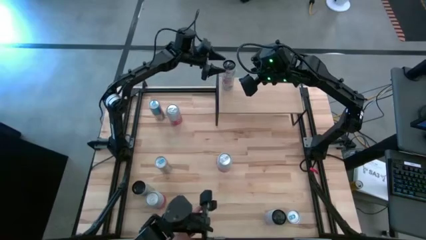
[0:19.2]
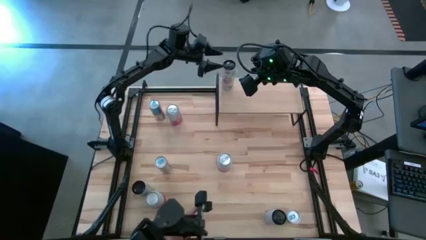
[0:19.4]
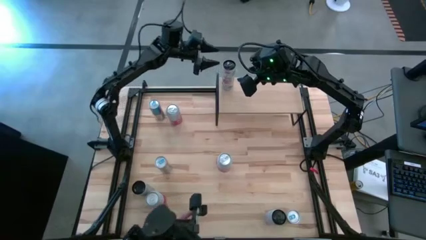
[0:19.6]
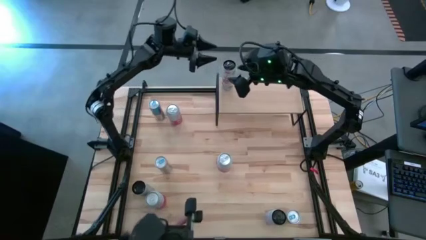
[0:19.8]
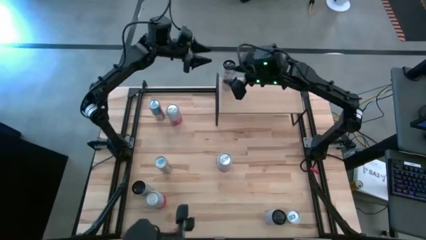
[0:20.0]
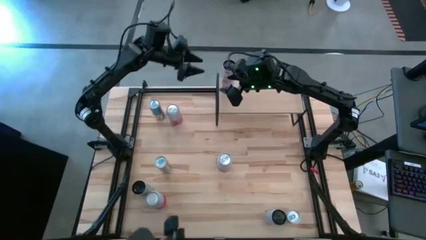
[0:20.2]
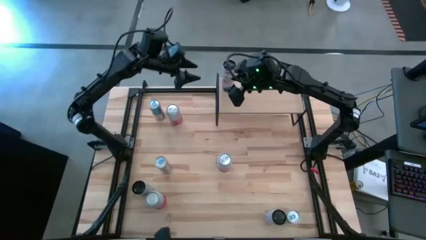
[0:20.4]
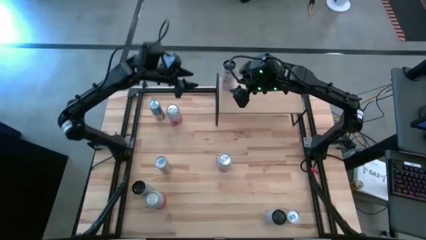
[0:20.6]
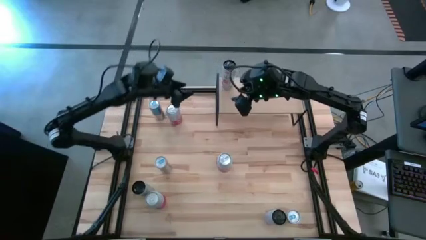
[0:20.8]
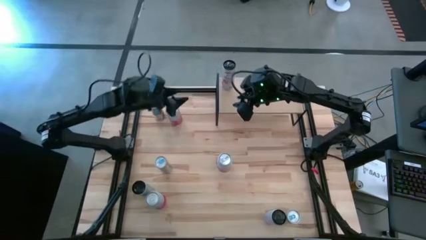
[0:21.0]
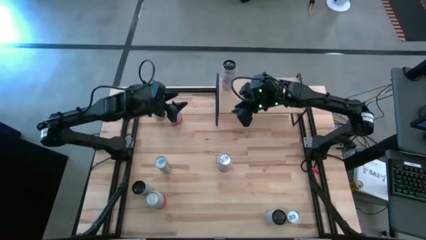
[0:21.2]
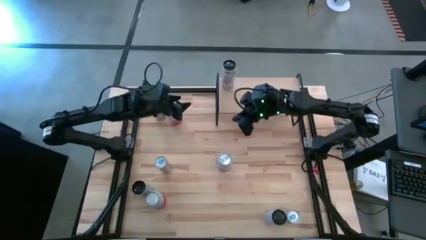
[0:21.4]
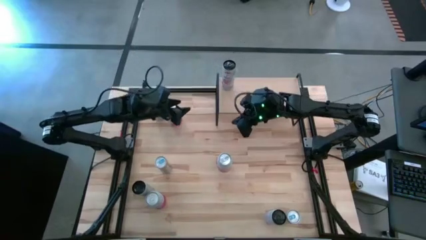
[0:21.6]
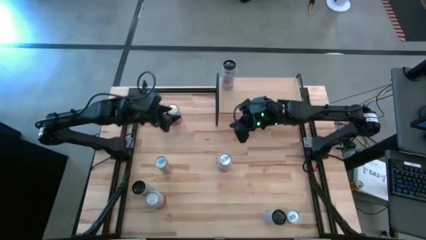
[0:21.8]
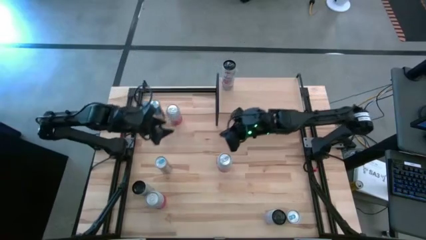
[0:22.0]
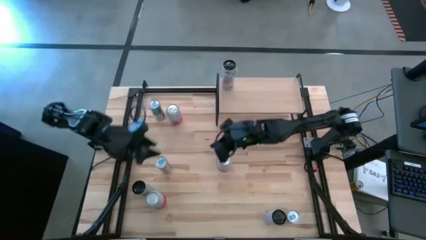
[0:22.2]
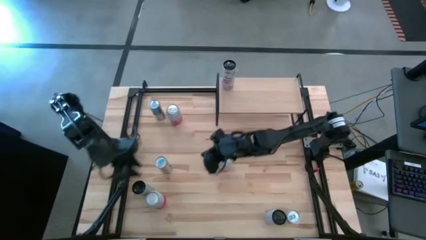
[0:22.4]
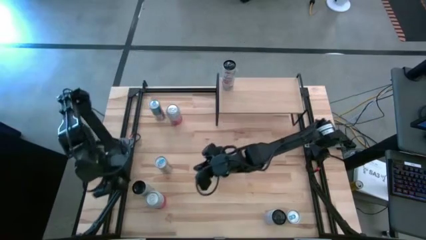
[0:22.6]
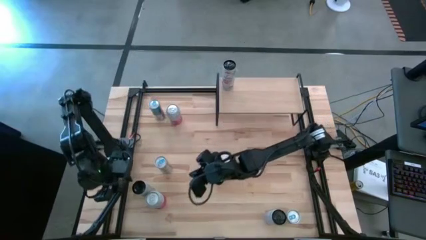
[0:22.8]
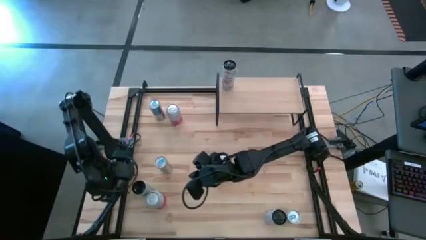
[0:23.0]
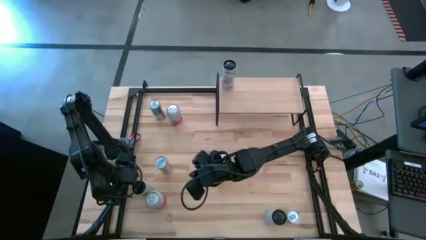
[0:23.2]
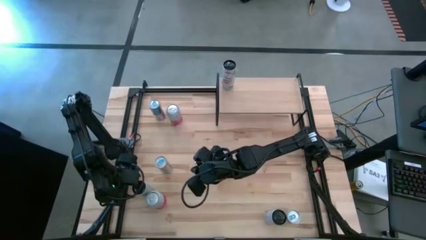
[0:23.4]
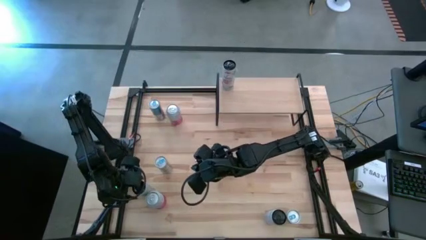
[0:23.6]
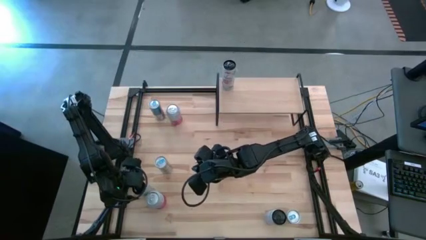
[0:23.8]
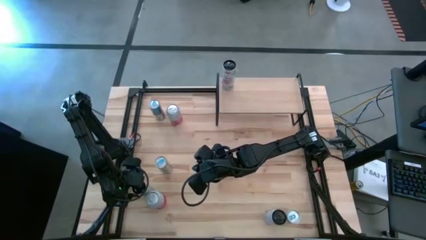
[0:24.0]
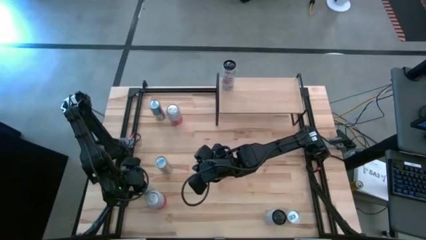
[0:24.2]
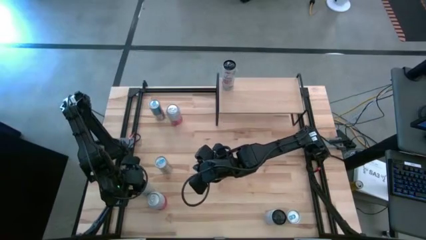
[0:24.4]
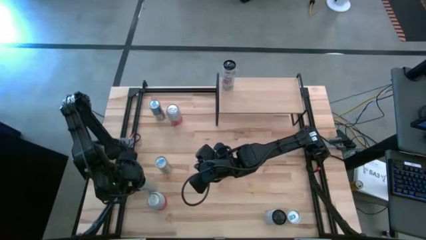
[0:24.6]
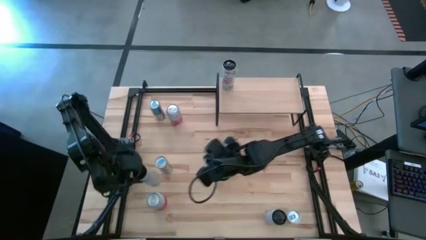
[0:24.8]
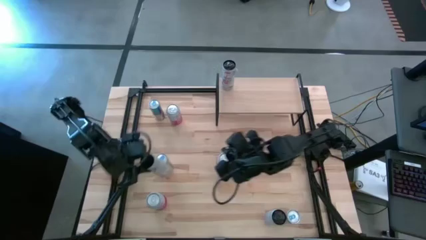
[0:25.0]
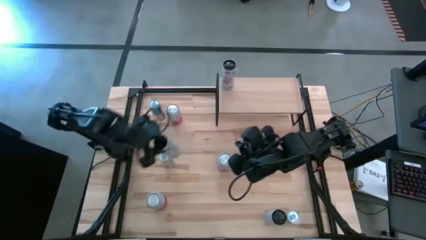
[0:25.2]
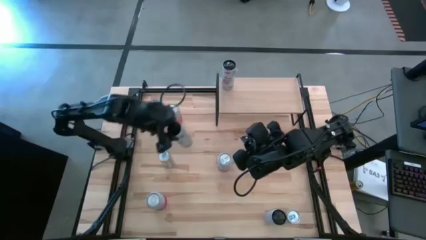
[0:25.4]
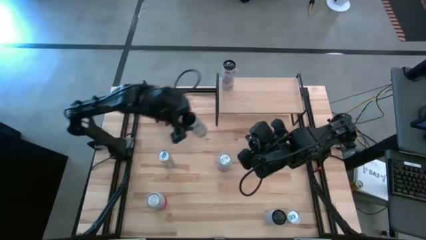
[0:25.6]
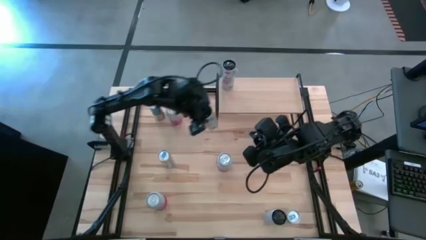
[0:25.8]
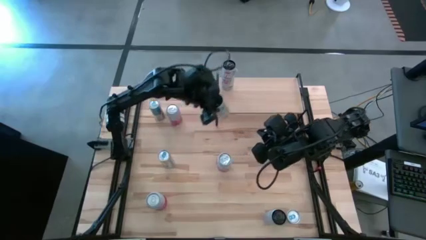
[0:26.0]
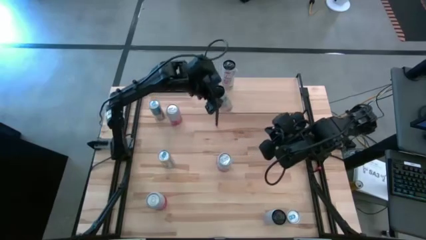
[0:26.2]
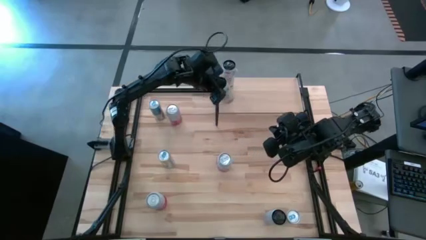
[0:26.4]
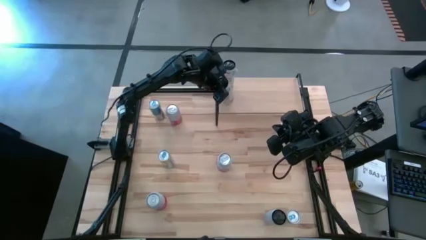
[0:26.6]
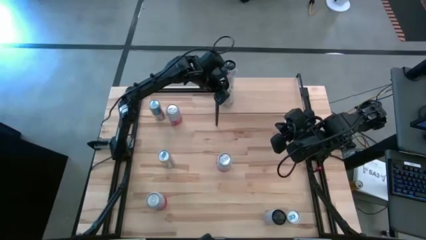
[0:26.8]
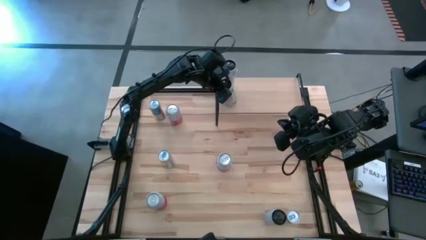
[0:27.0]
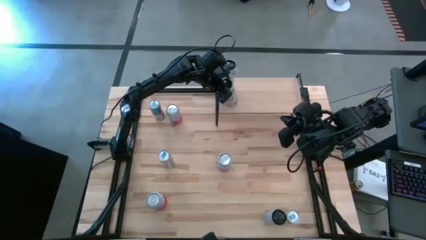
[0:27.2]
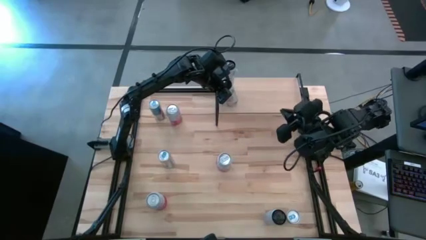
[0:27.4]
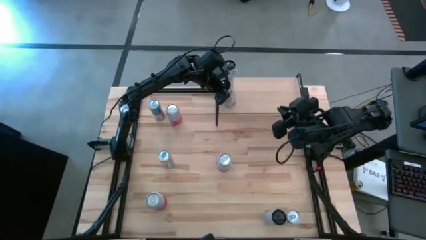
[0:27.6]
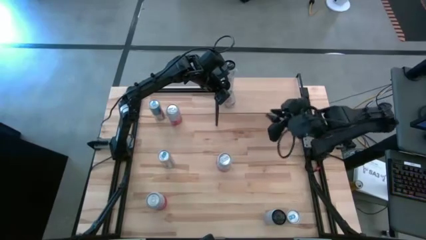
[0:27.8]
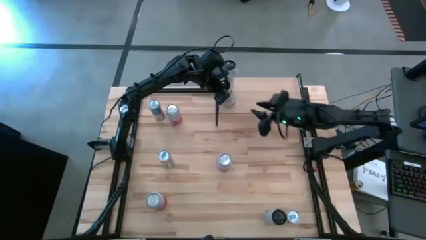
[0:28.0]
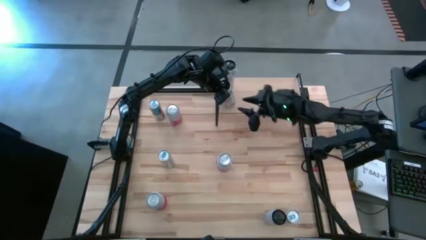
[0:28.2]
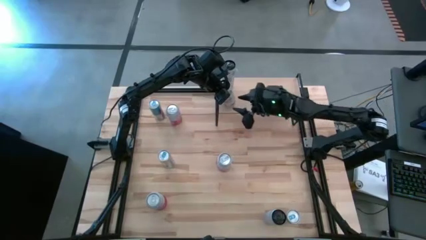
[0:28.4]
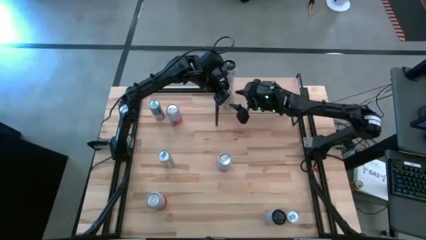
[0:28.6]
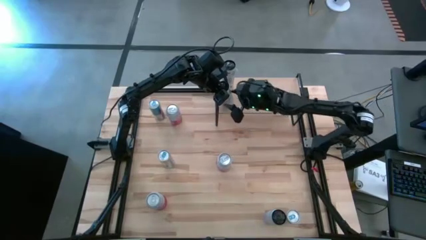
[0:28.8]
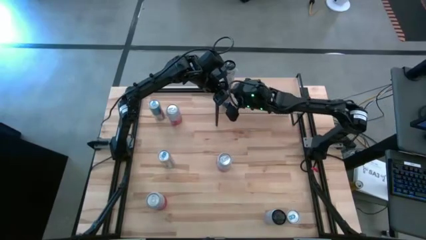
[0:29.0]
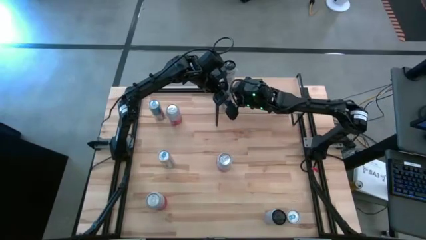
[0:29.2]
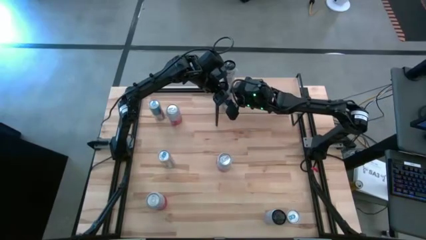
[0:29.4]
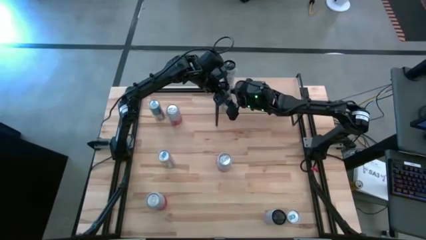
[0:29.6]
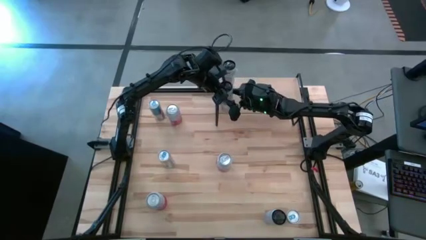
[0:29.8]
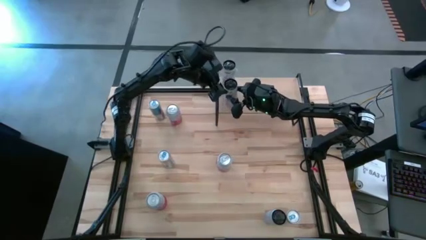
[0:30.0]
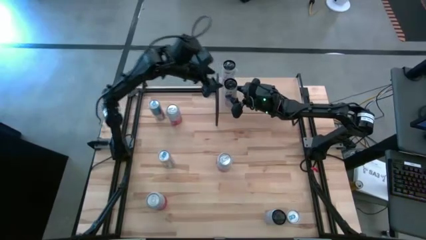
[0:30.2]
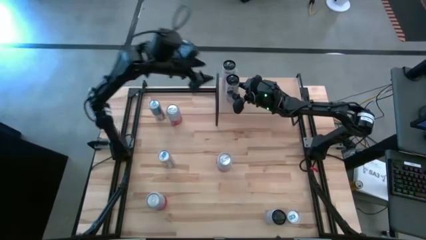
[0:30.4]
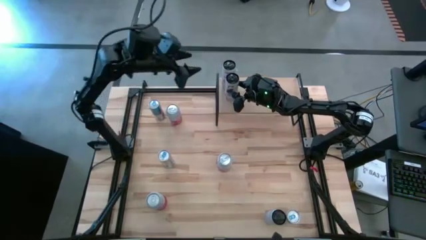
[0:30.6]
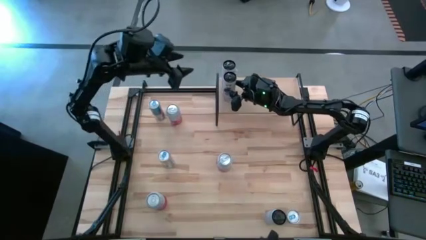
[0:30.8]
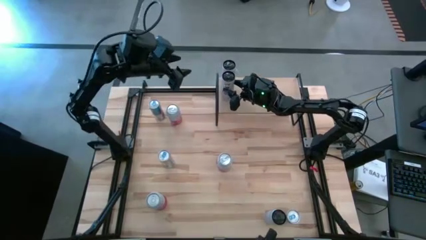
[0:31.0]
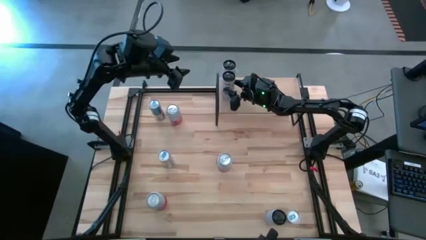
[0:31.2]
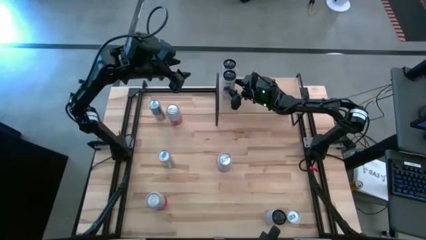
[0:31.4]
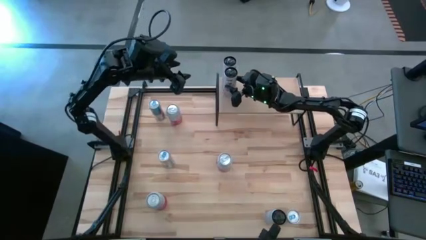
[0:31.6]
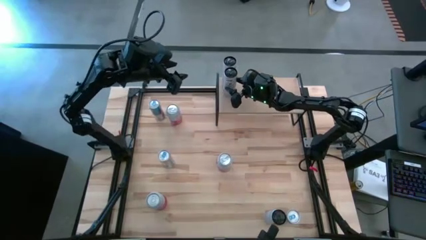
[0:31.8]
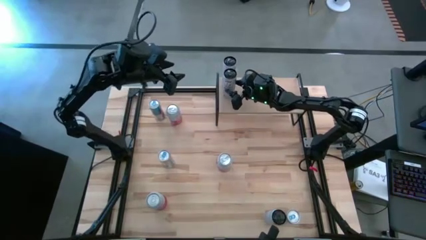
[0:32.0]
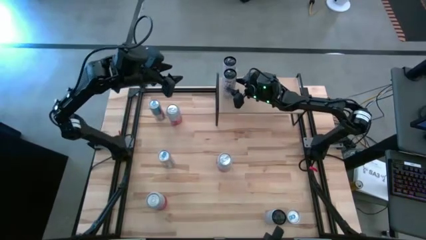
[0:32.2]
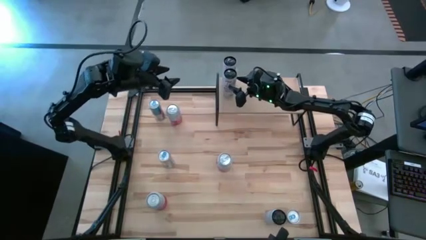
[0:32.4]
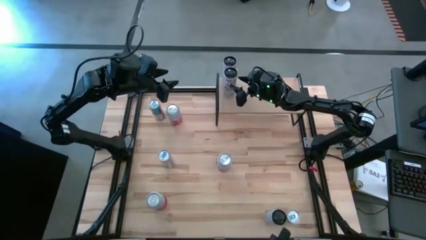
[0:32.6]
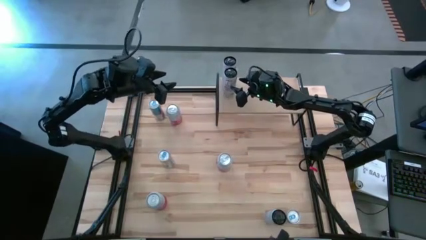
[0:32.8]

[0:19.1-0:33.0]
Task: Place canned beverage on shelf
Put the left white and pink soda can aligned with the other white soda can on the shelf
